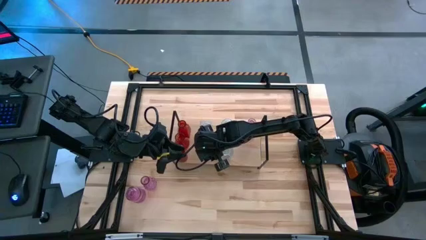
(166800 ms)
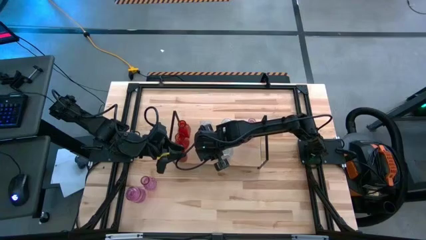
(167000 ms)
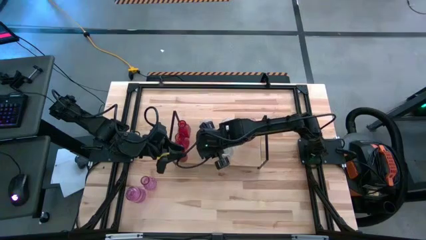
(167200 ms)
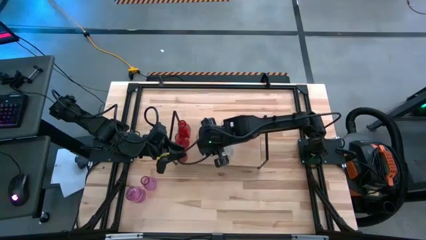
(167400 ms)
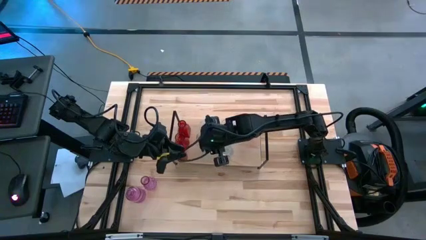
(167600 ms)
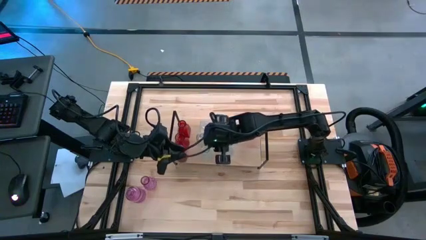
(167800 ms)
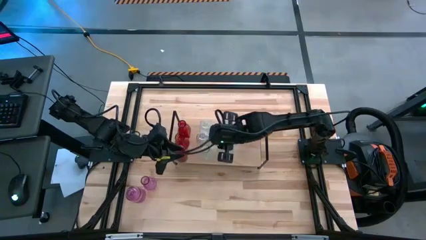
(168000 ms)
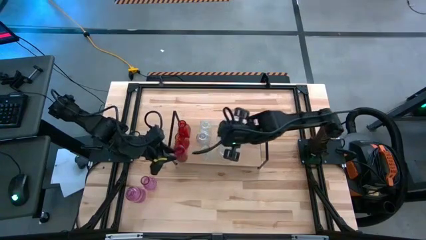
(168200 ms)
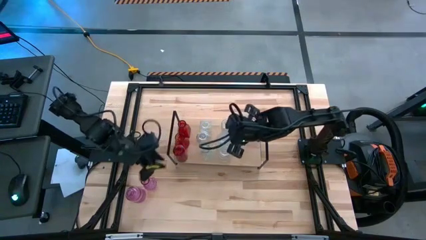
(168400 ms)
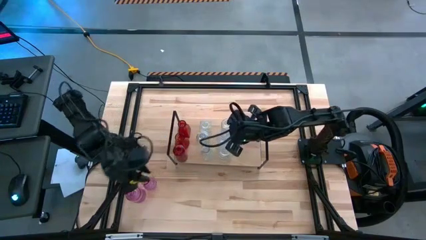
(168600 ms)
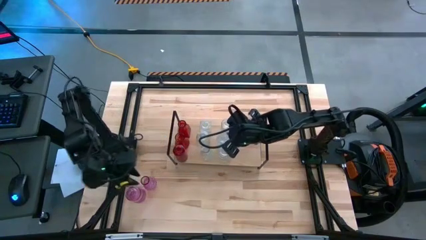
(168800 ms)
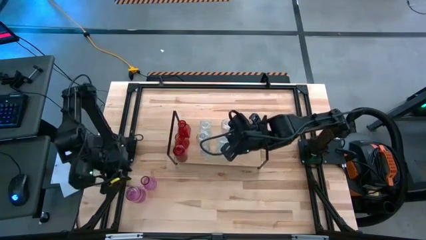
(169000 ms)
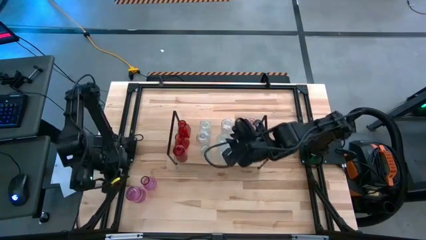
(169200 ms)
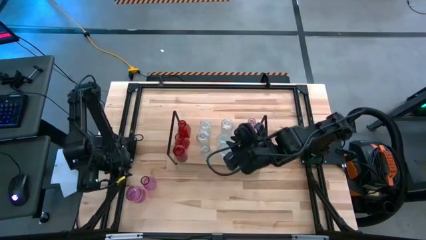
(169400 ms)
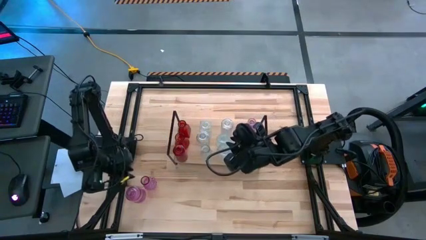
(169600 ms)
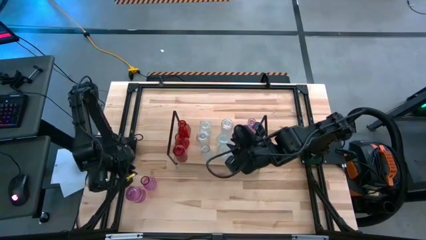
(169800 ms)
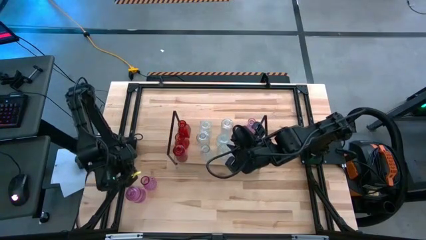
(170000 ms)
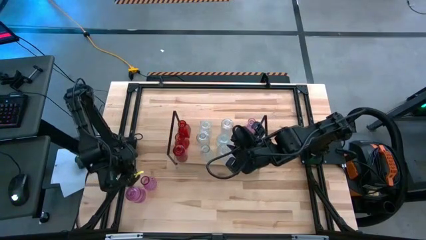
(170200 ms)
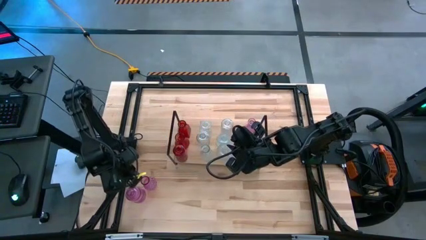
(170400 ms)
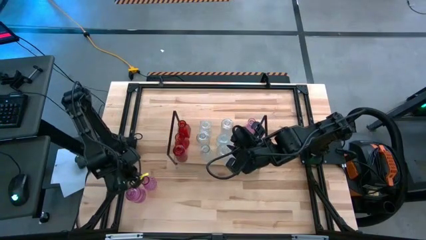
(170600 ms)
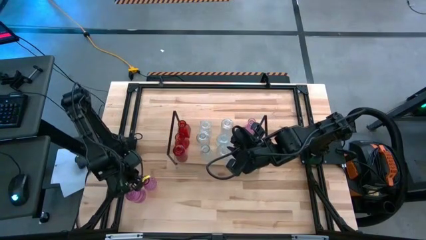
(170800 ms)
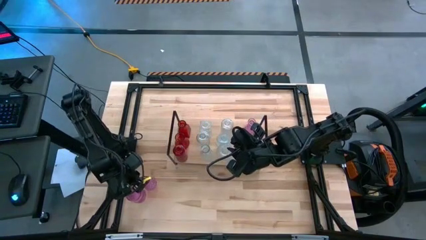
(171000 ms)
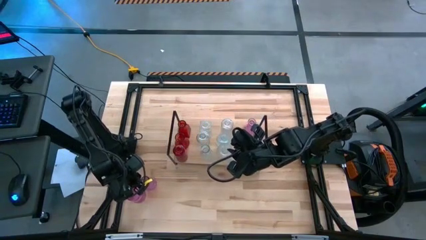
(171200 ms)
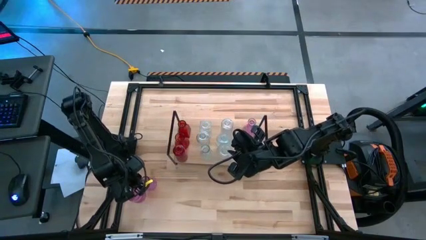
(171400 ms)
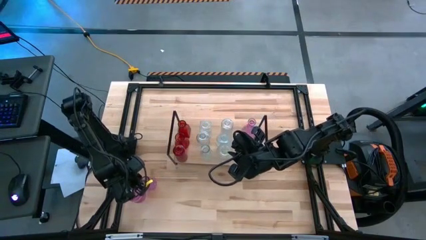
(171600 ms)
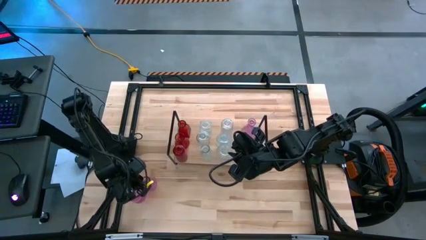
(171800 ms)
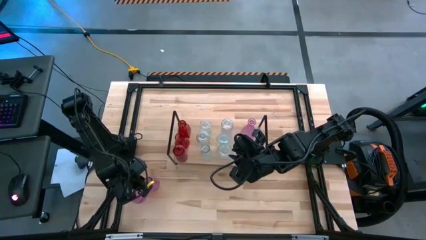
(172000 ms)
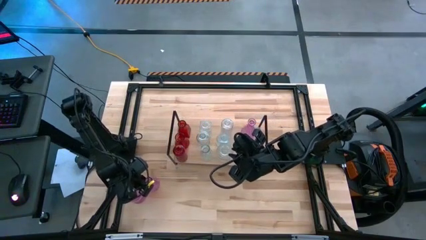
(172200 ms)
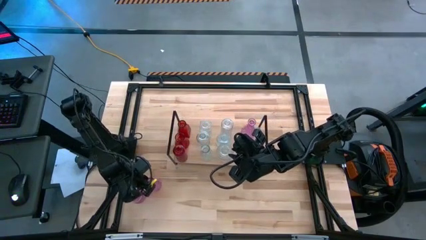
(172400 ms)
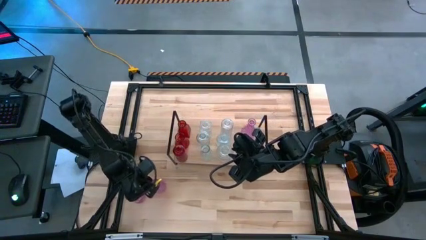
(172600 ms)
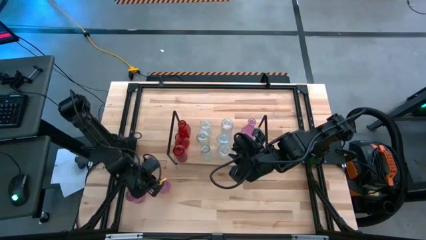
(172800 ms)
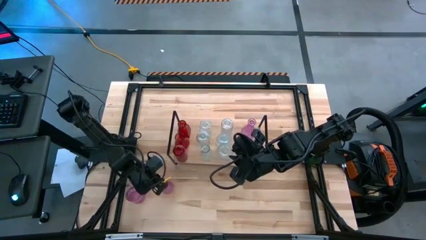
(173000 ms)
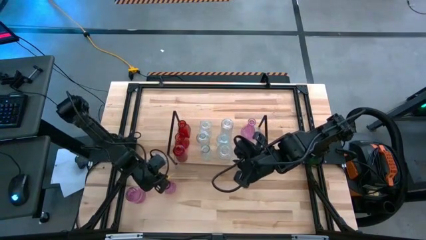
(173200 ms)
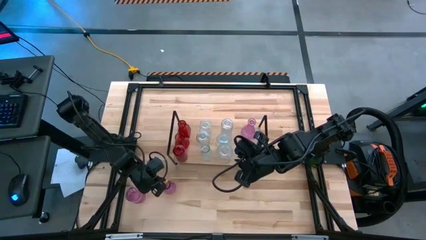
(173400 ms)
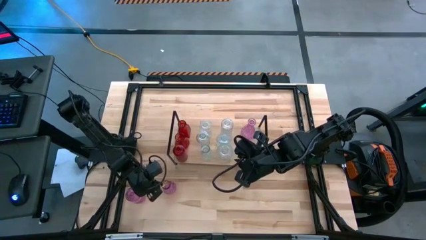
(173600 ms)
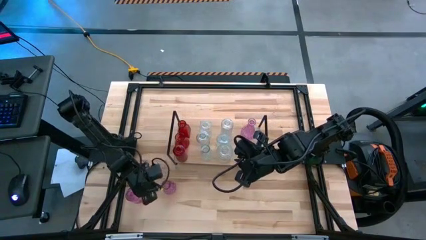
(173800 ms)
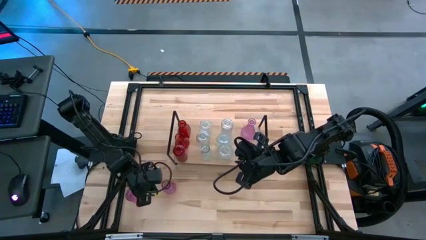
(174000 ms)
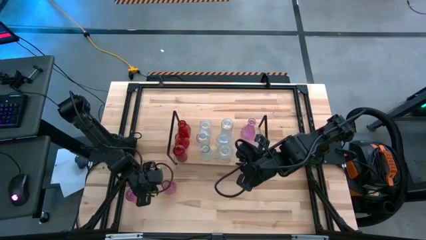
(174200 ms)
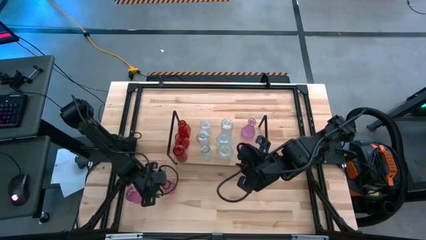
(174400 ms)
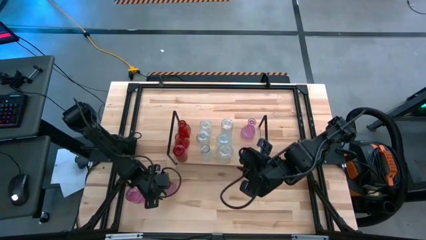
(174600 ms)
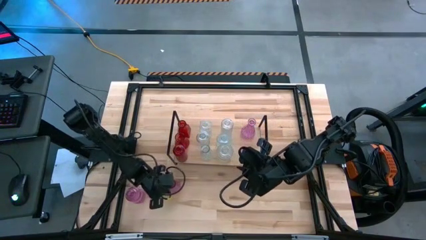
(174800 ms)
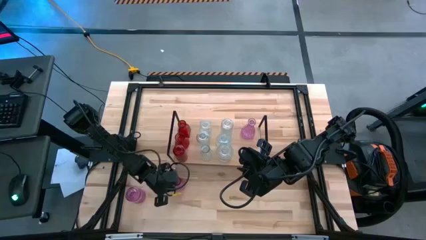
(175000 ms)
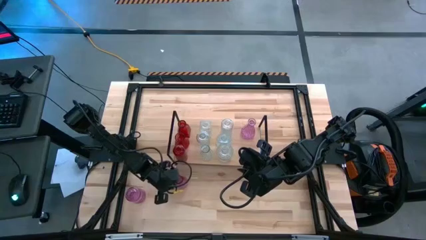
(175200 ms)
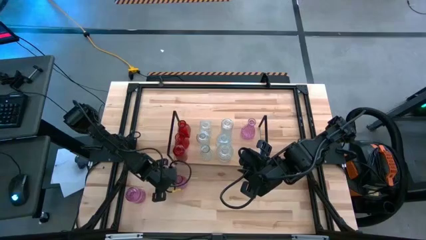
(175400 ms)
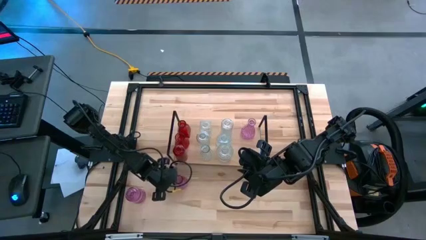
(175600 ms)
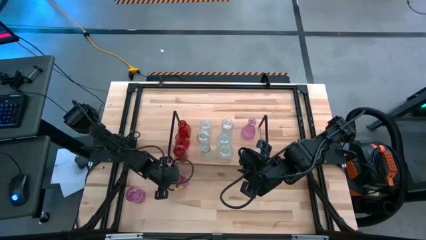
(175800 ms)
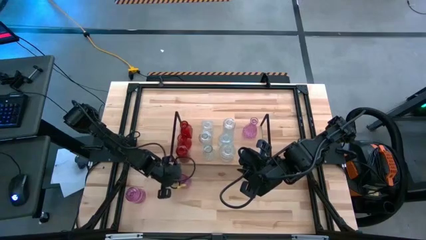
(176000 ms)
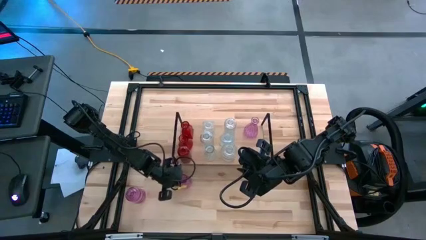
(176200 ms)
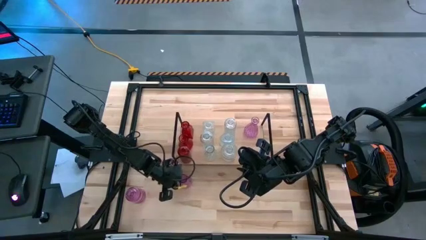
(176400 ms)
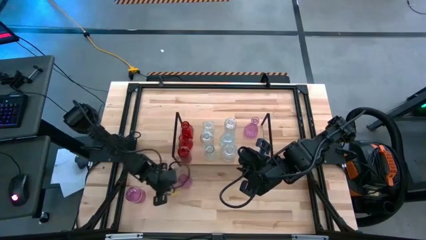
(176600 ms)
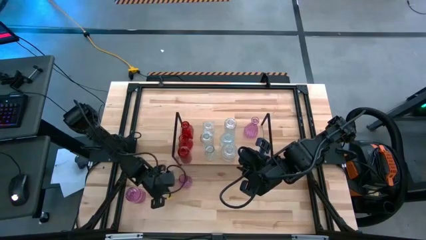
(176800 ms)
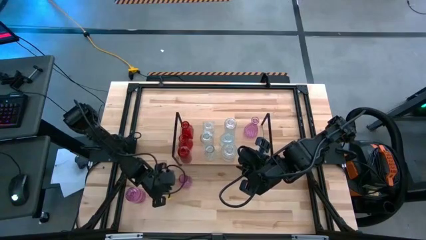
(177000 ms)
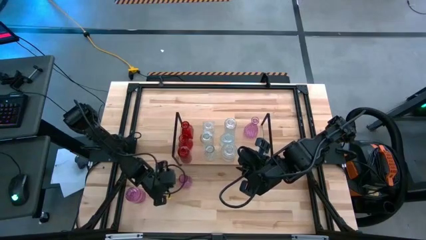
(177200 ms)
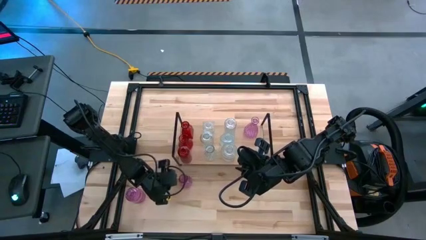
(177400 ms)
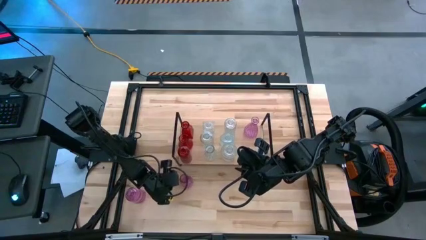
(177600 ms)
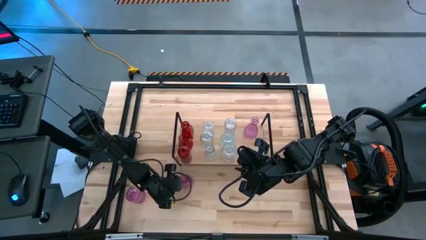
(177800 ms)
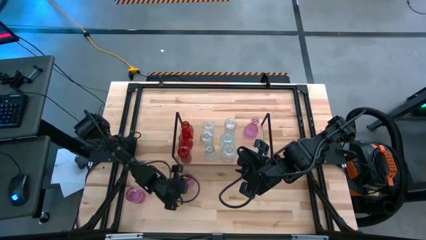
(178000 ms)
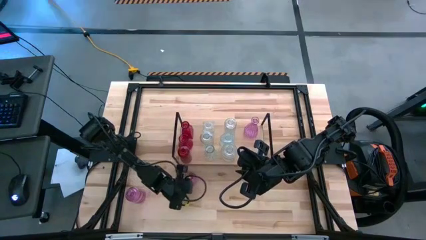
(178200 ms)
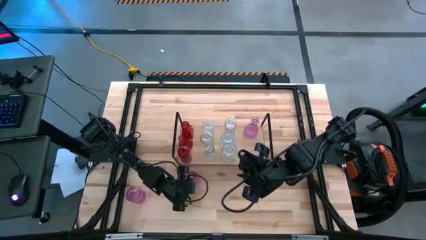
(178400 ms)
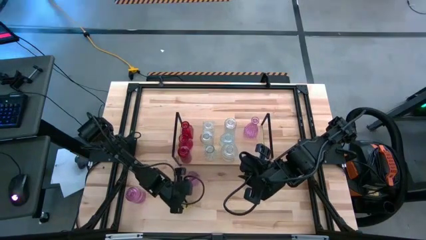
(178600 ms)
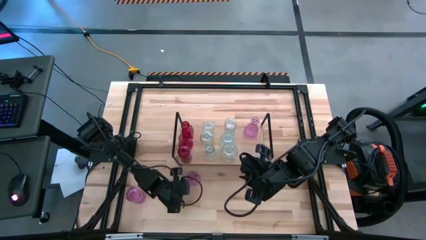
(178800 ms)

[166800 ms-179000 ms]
Task: sort vases onto shelf
Put the pink transparent vase aligned with the other pink vase on the shelf

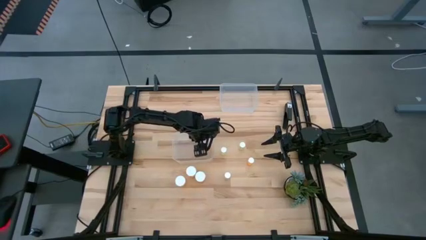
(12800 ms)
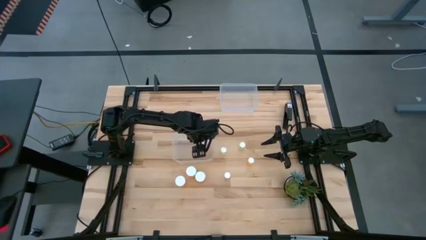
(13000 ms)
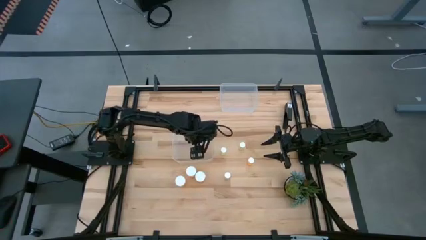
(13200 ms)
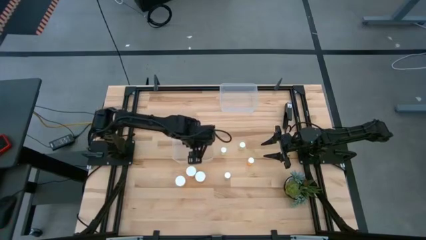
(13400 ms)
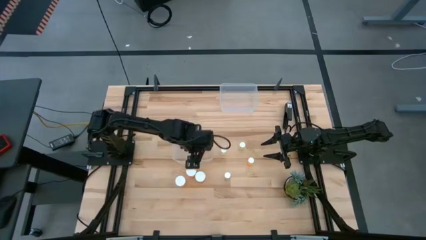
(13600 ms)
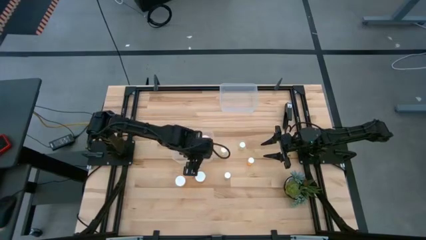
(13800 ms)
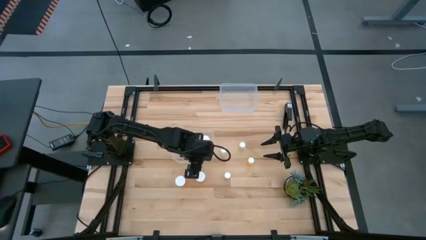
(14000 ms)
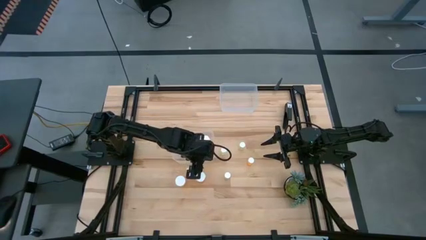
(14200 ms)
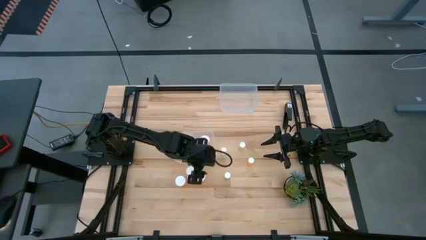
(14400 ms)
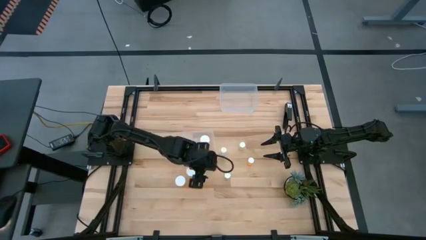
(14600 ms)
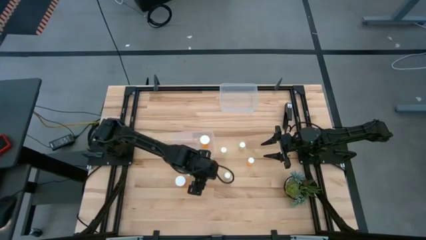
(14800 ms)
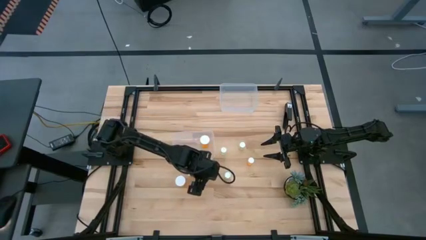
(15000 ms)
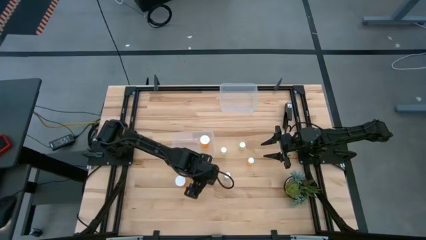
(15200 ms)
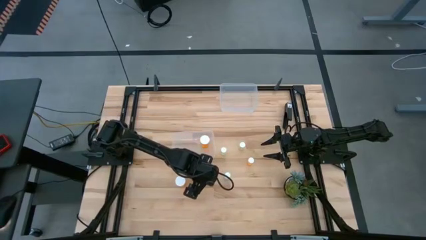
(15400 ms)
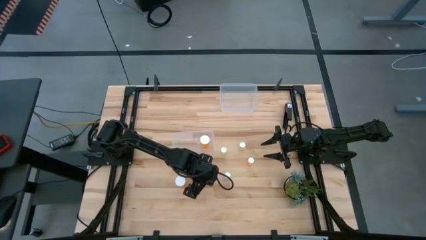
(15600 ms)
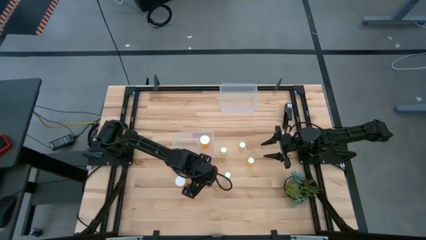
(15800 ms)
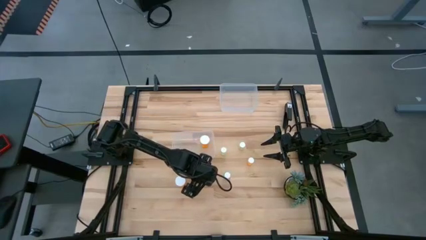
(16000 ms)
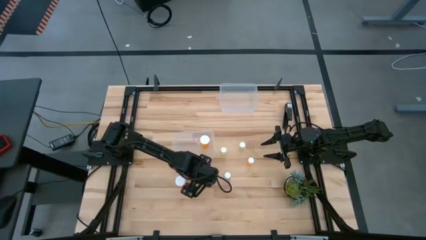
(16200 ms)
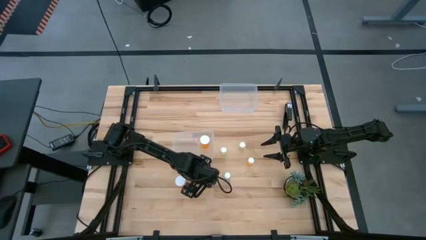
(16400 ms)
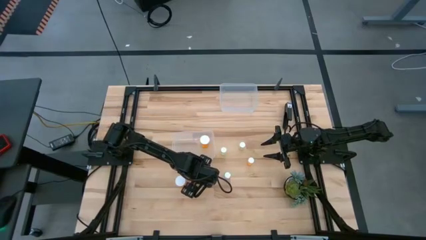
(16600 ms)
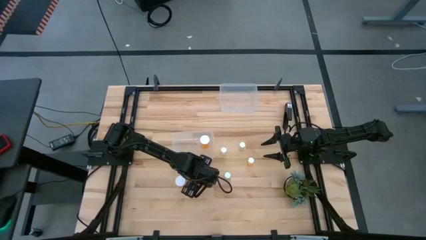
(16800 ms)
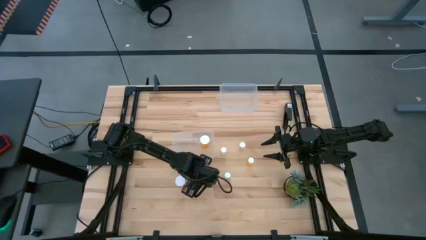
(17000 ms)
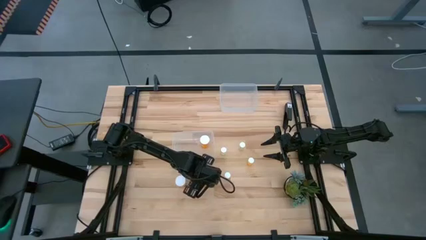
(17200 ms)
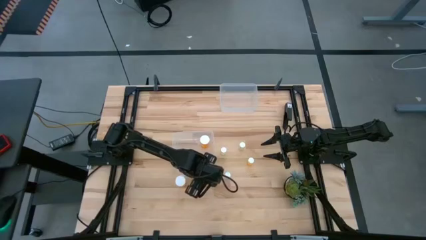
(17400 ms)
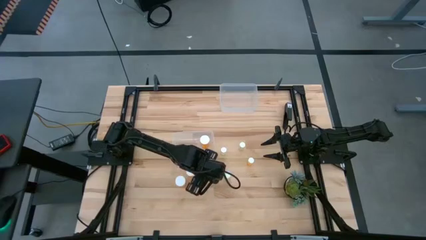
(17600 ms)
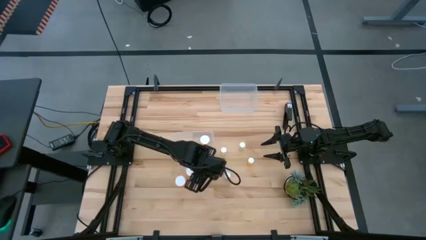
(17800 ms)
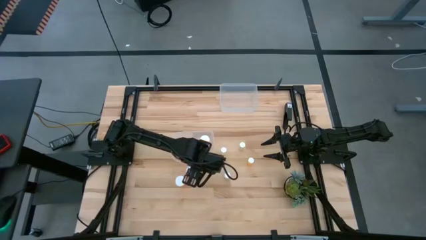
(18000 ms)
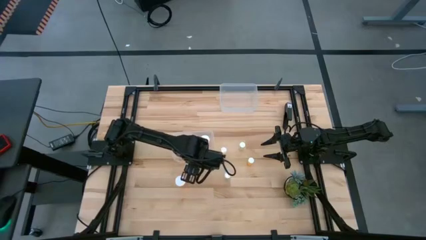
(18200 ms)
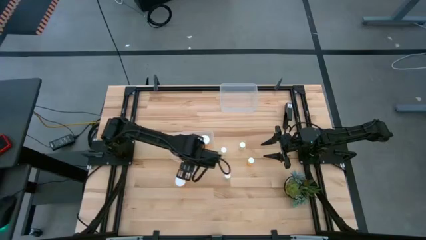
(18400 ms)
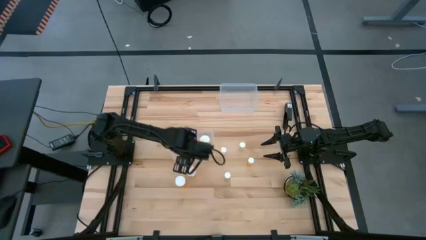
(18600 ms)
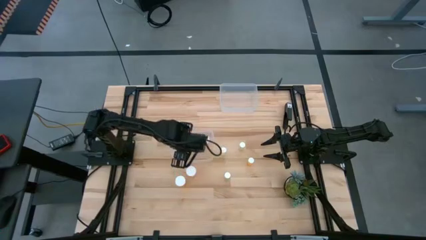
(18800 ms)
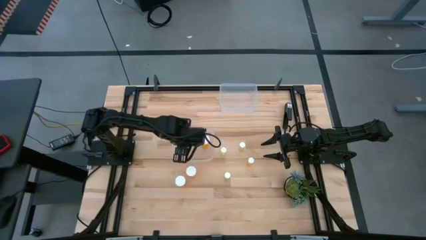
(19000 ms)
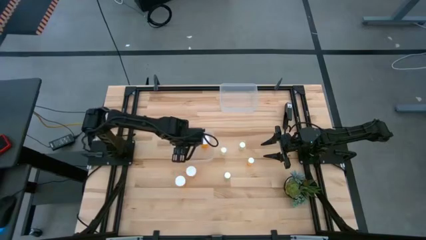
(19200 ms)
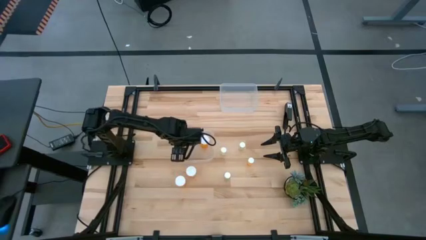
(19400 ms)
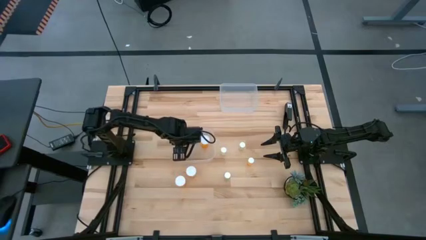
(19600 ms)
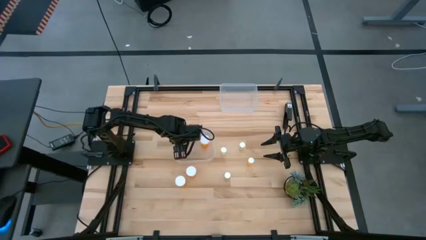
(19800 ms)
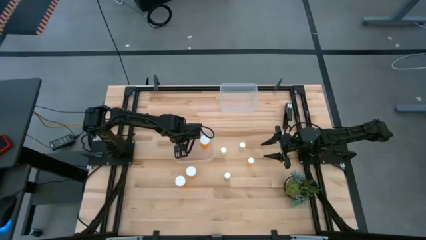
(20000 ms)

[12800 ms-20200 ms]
Task: Pick and place medicine bottles into bin by pill shape (circle, oval)
Put the large orange pill bottle into the bottom transparent bin
